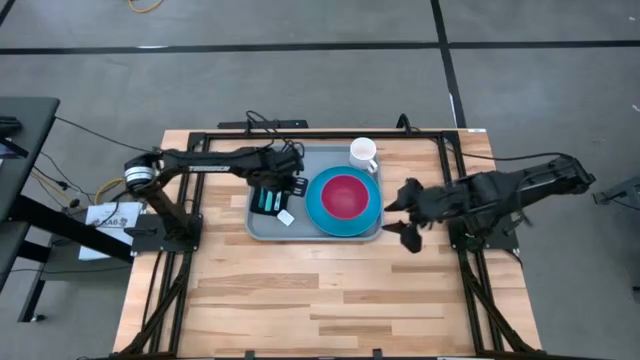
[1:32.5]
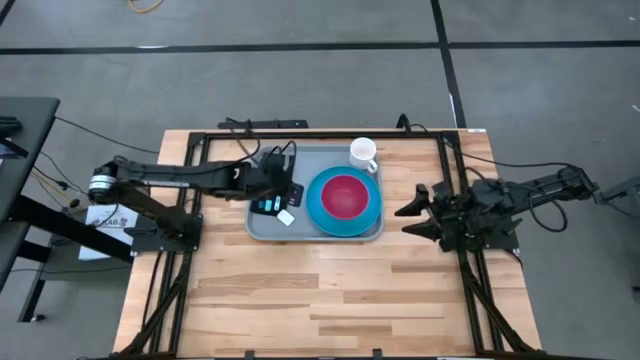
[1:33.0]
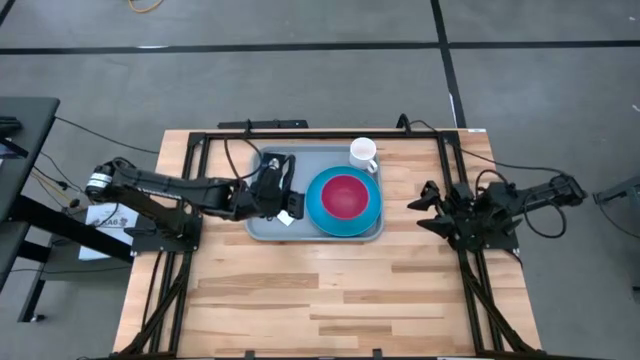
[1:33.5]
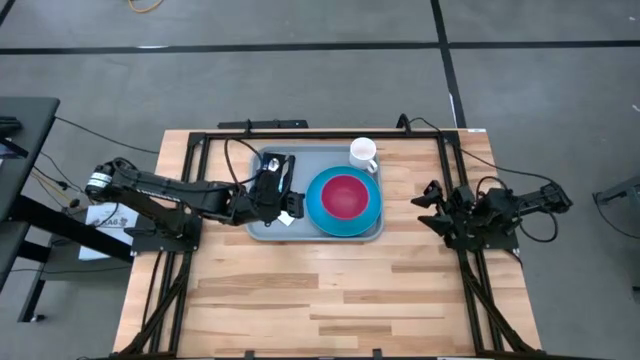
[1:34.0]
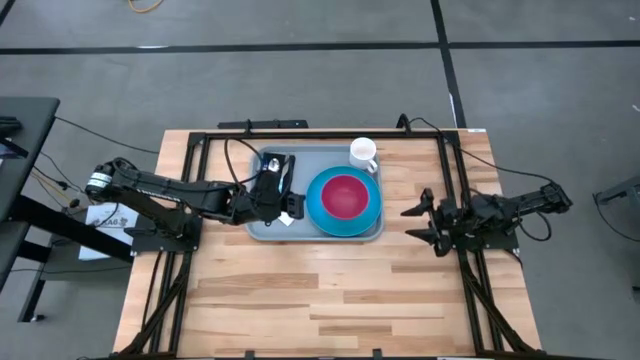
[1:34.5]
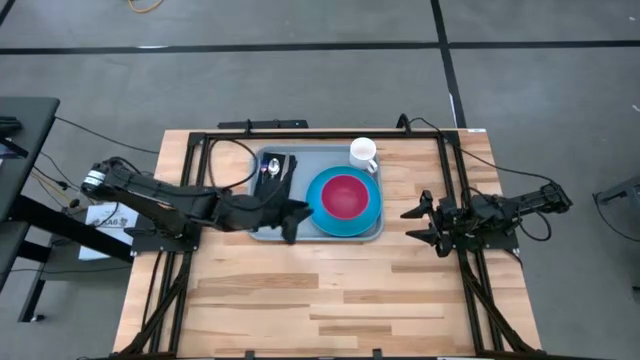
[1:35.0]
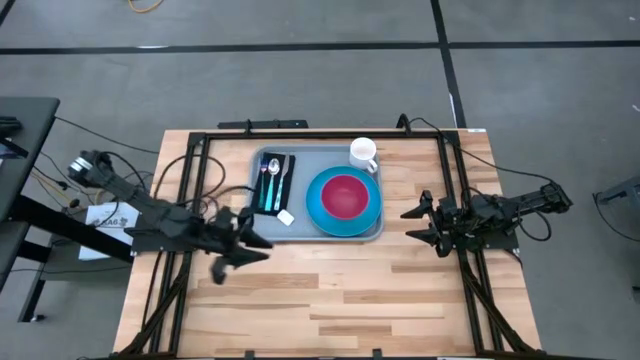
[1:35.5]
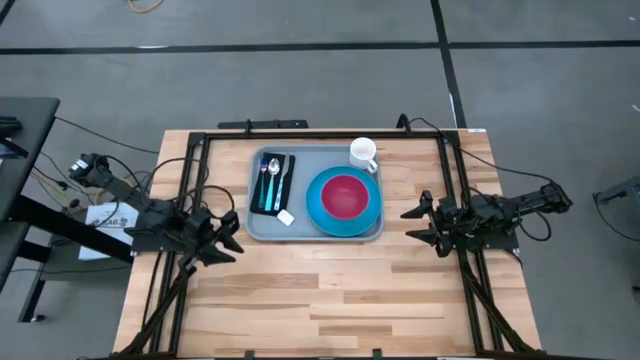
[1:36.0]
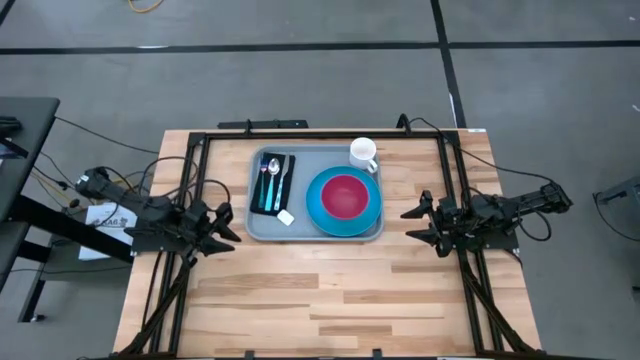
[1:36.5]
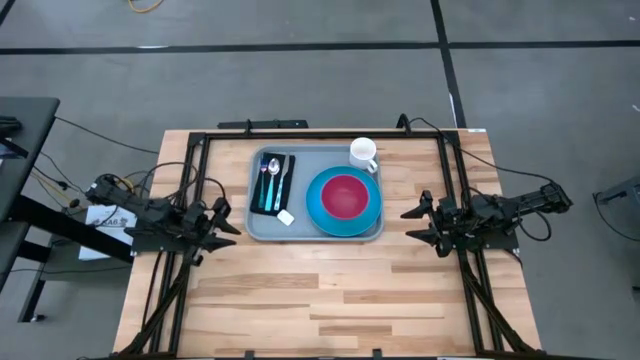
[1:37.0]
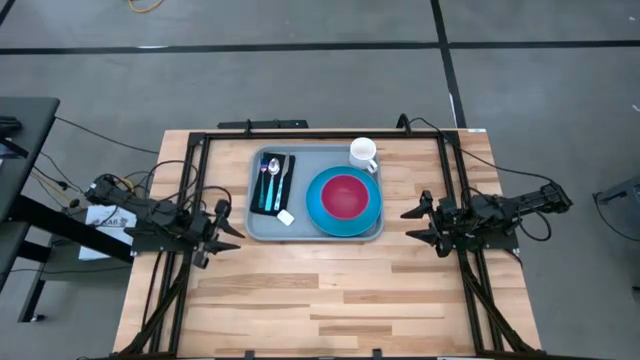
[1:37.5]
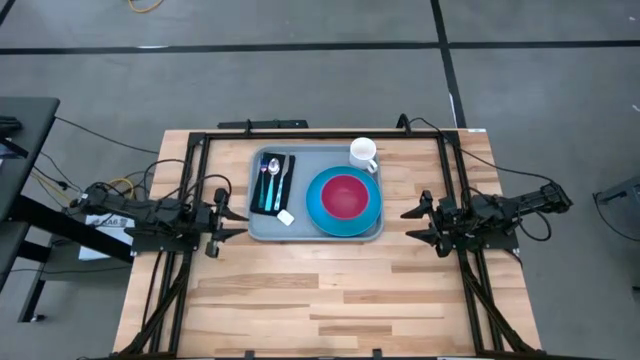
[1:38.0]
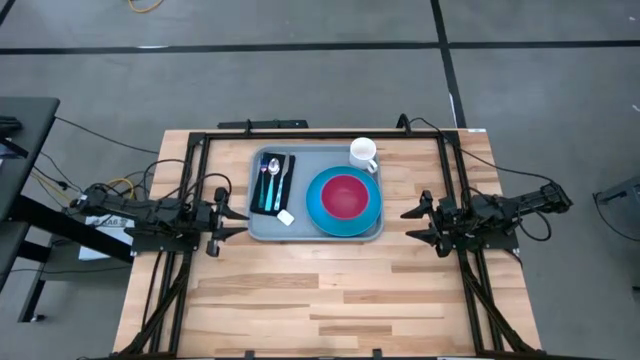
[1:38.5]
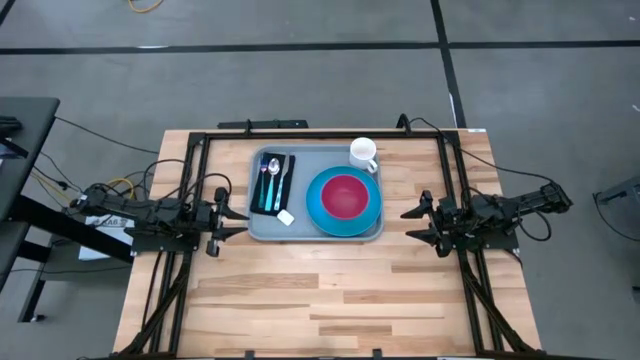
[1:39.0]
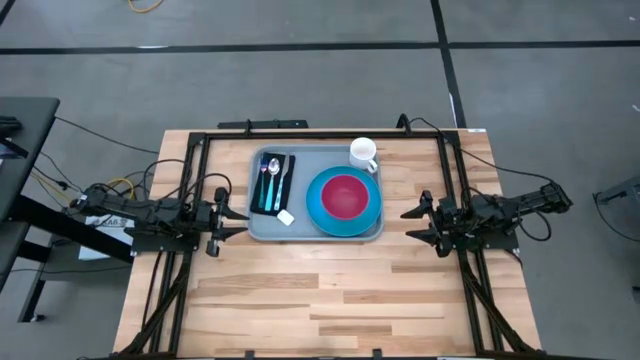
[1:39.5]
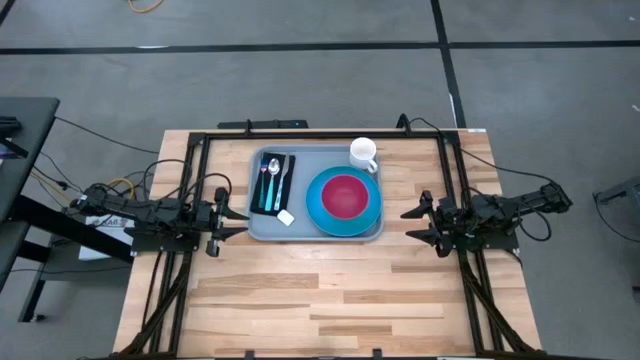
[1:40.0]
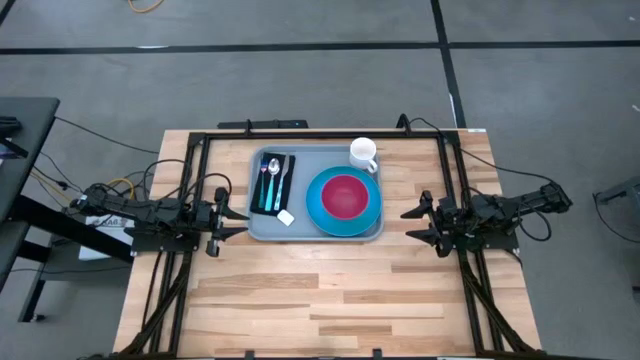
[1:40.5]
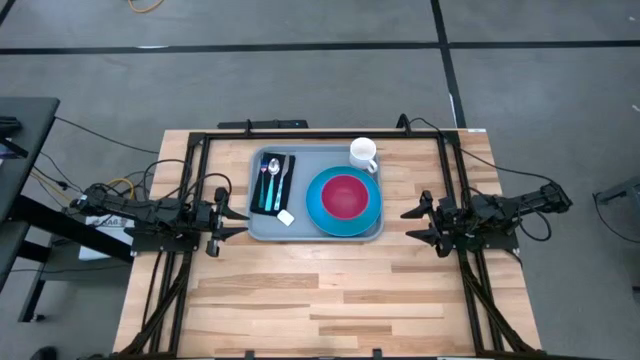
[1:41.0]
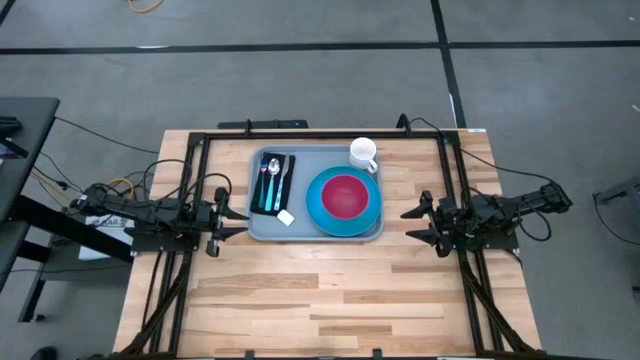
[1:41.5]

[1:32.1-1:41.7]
Task: Set up tray
Return to Home Position
